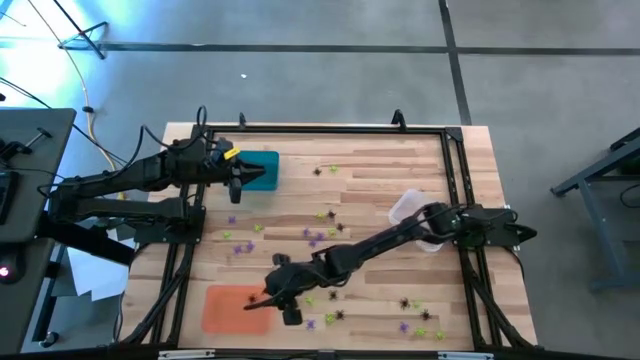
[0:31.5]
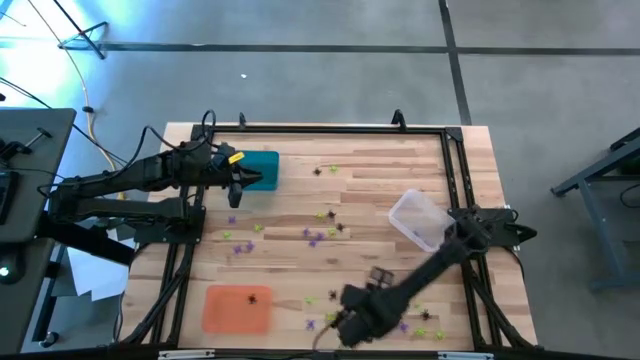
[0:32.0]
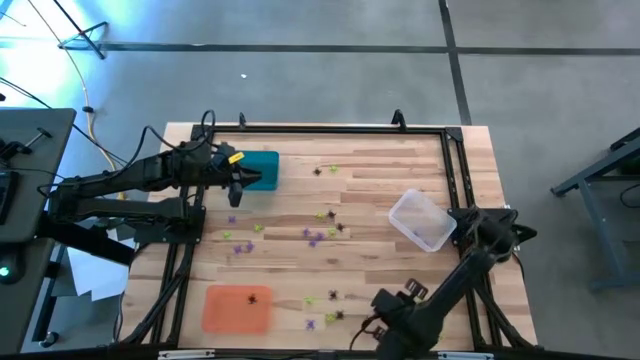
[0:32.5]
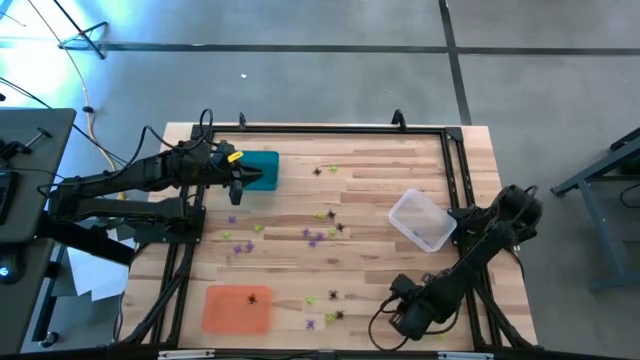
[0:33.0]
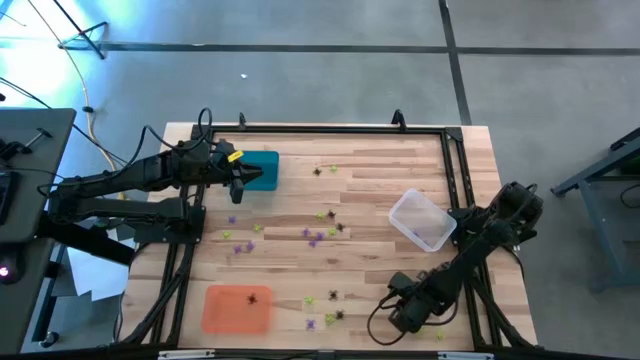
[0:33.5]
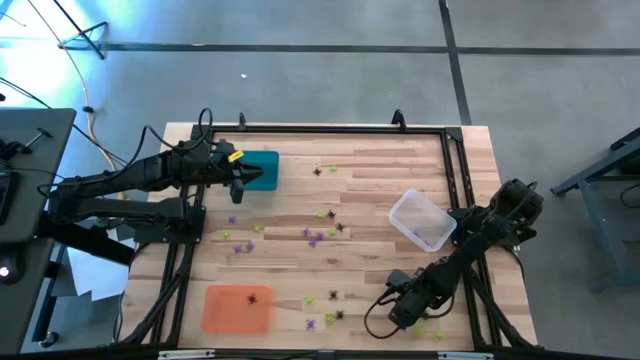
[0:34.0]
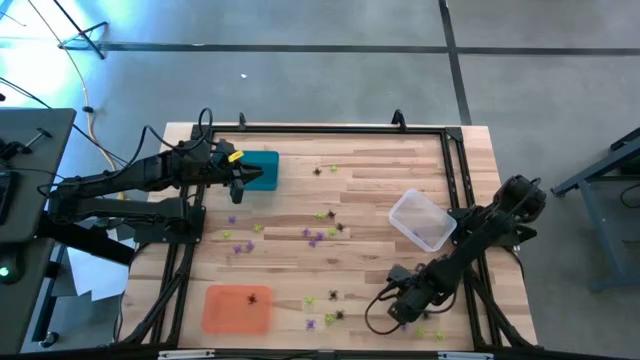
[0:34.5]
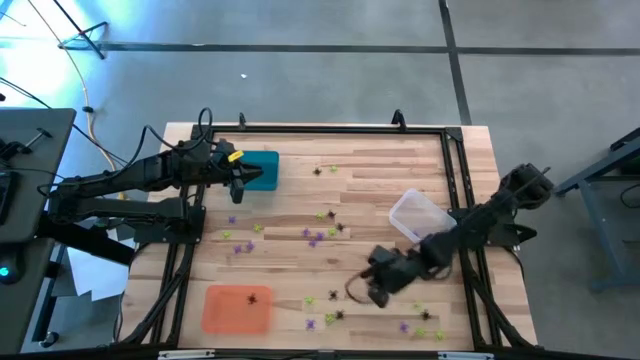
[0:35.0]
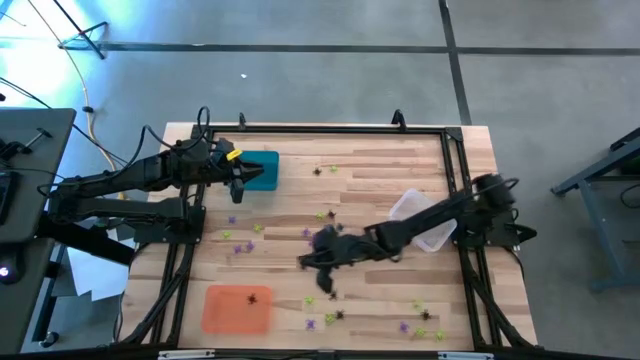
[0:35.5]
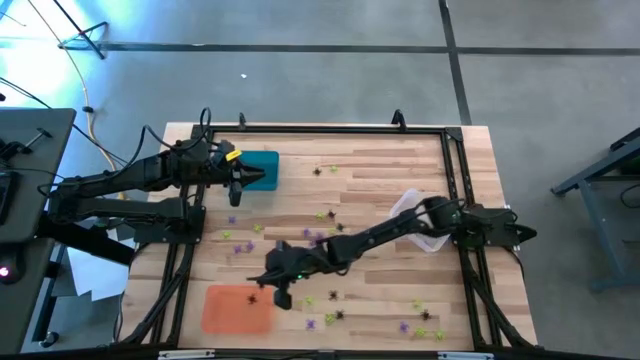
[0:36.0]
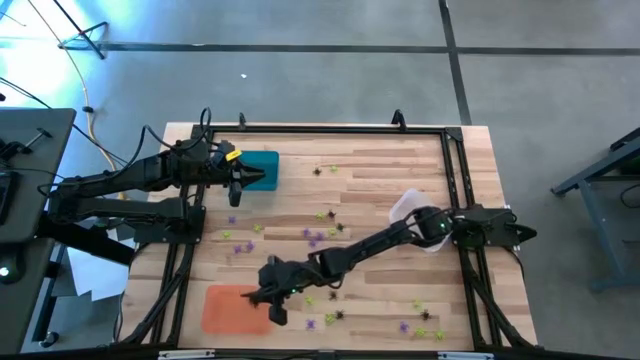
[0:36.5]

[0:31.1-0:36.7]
Task: Sort Halloween decoration
Put the black spider toy into the orange bin

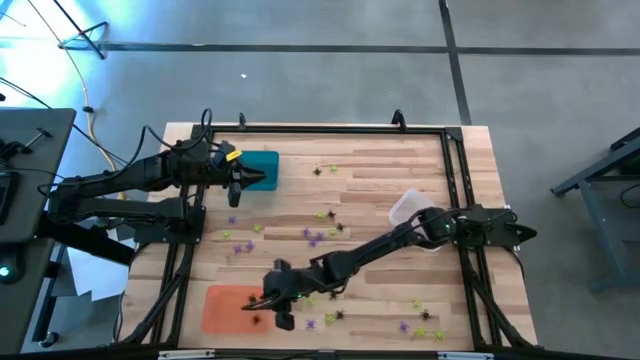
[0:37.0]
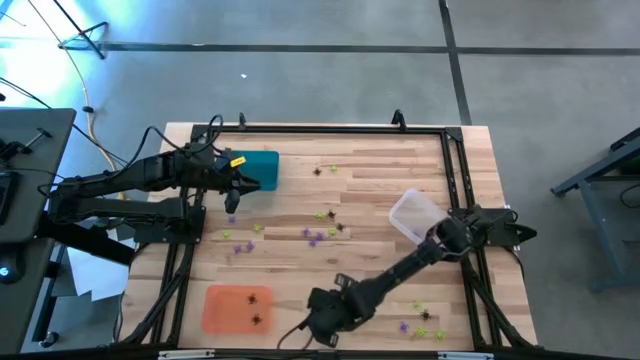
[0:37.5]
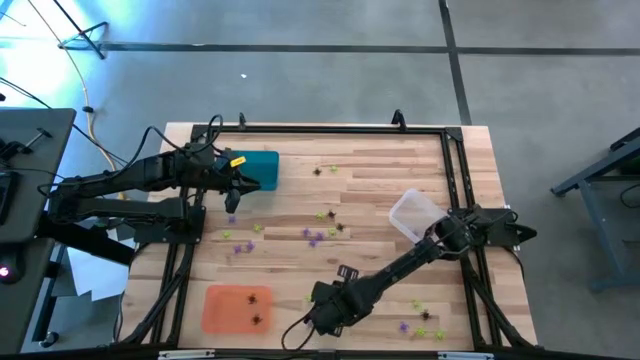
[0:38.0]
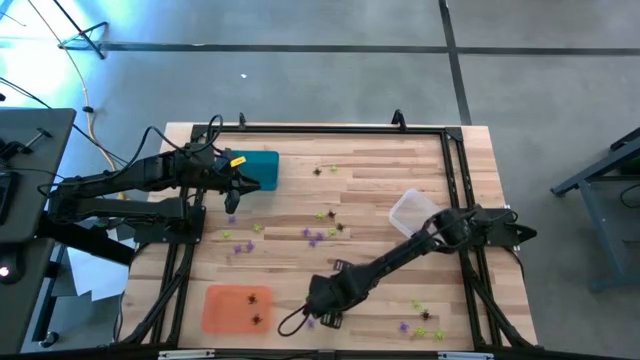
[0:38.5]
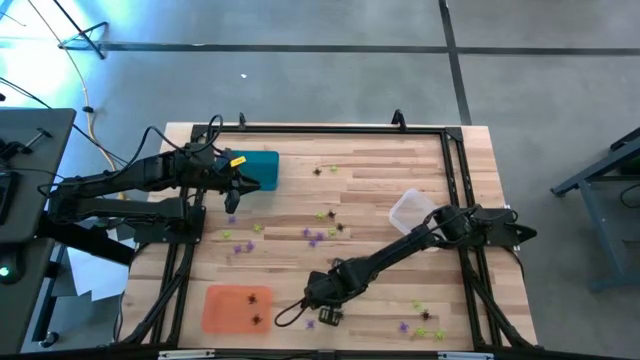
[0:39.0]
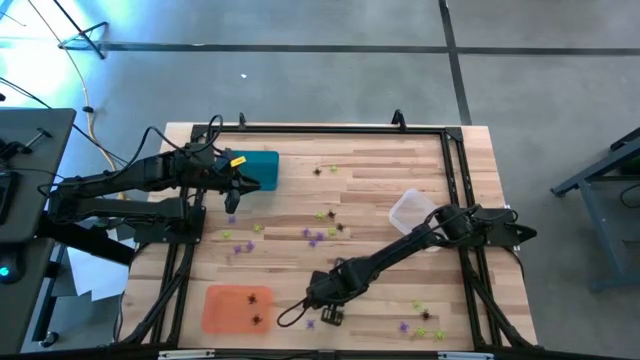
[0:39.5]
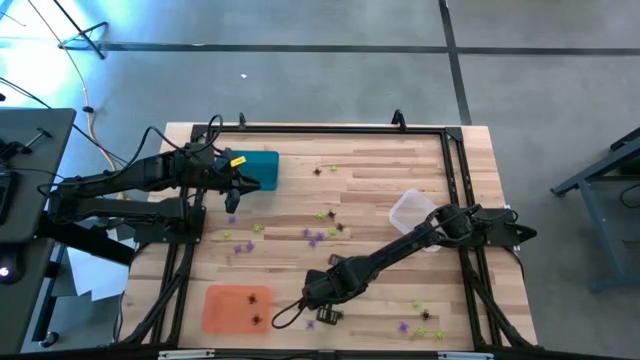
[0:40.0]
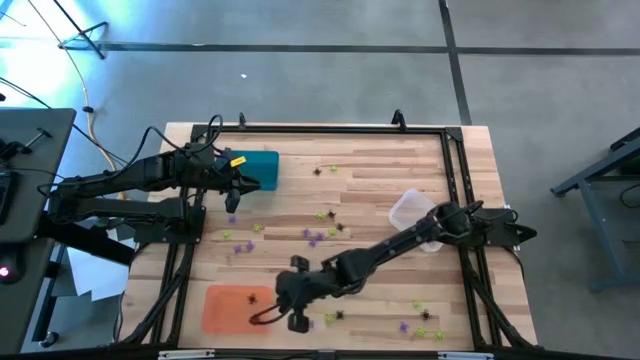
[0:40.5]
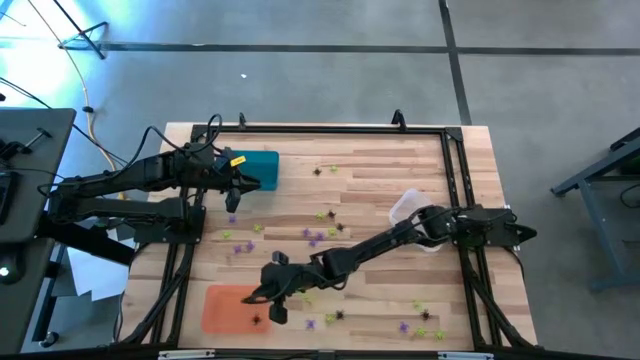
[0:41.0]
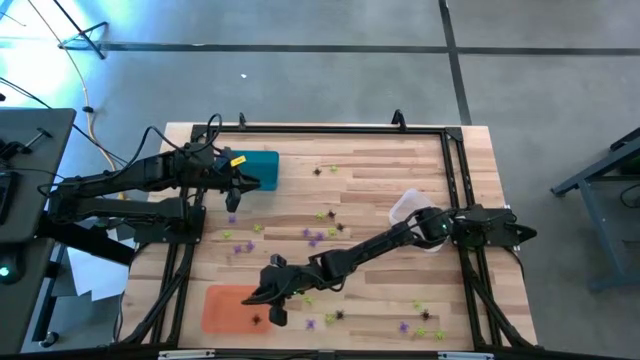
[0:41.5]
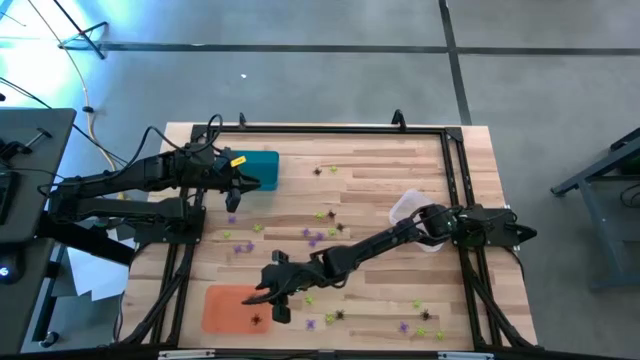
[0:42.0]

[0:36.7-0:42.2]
Put the black spider toy into the orange bin

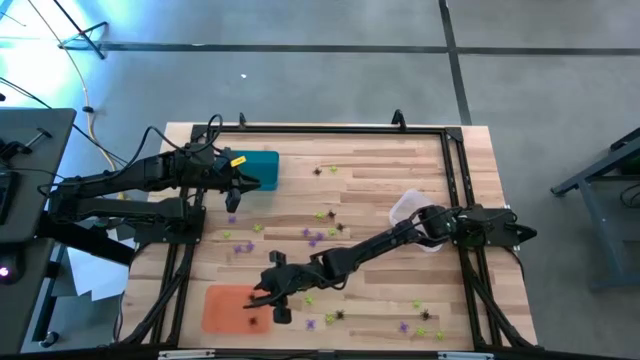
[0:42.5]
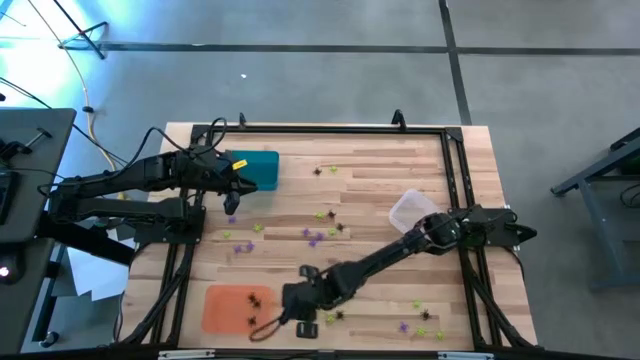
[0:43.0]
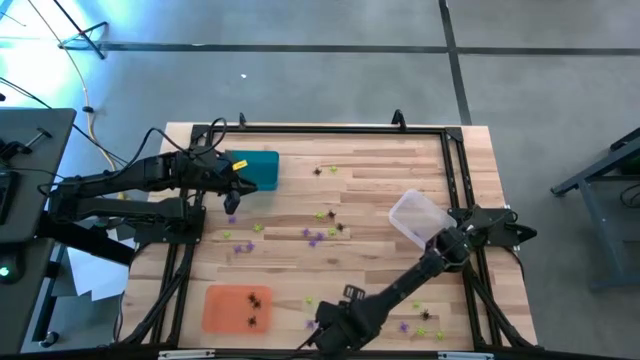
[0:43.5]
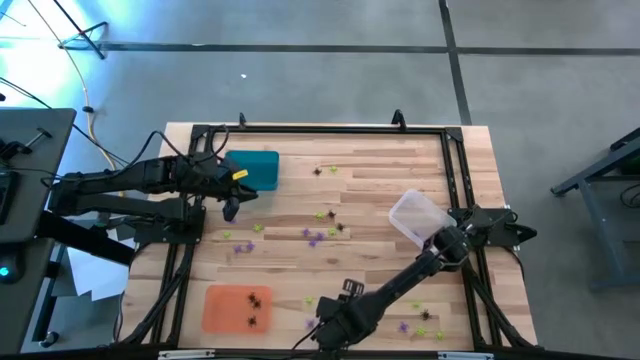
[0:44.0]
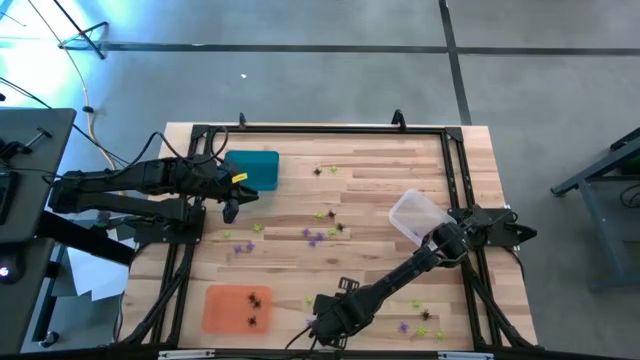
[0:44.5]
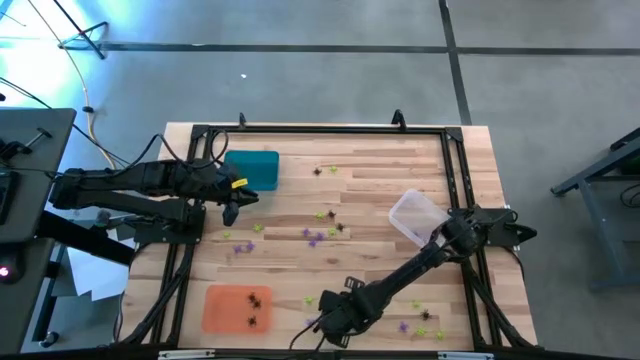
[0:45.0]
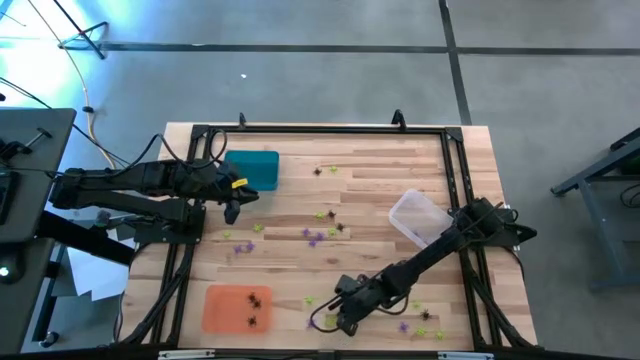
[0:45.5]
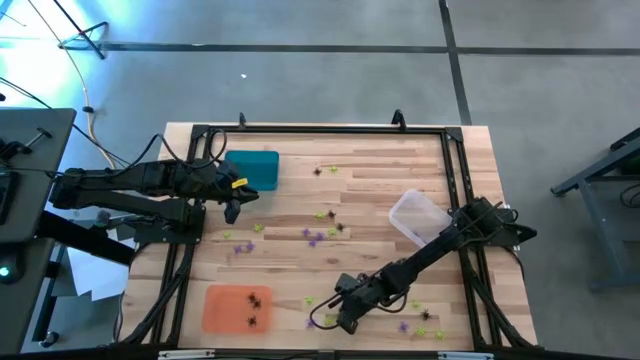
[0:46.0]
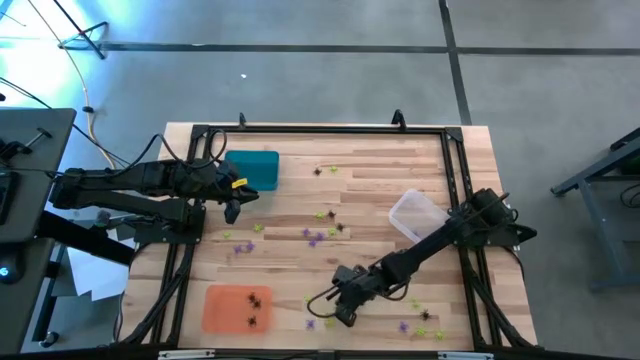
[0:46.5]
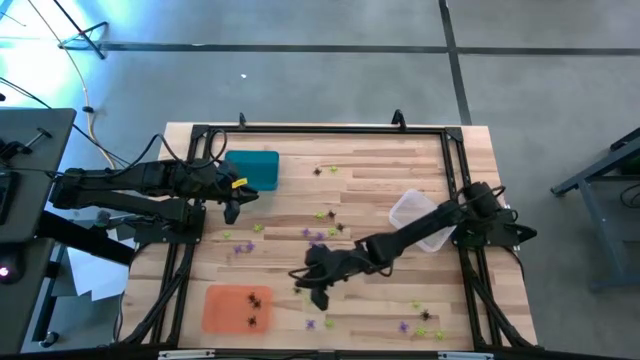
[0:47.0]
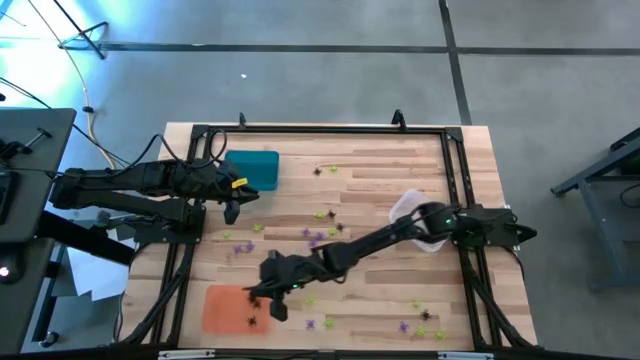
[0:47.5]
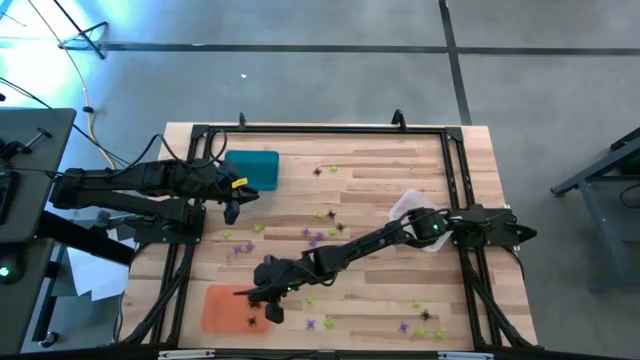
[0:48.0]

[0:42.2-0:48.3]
Put the black spider toy into the orange bin

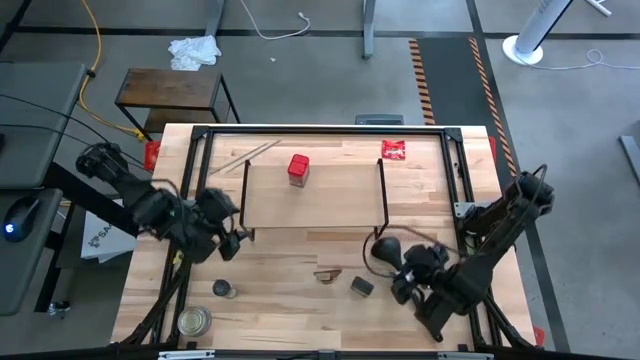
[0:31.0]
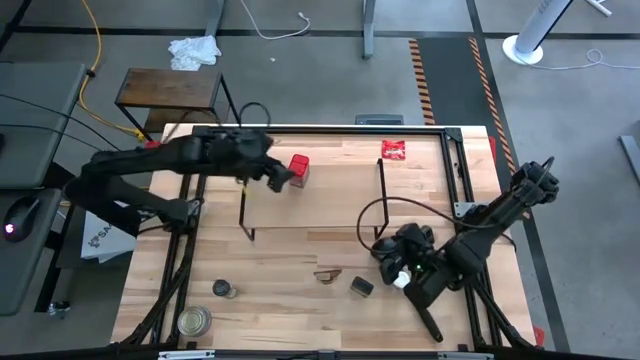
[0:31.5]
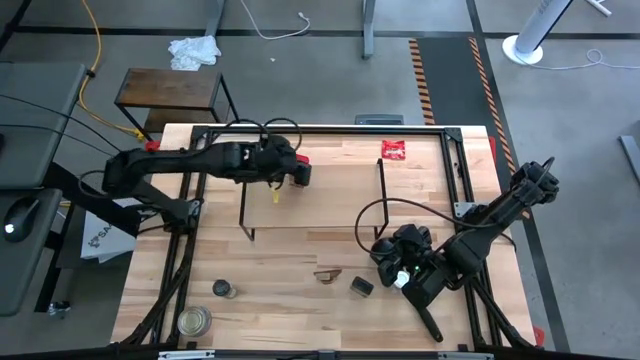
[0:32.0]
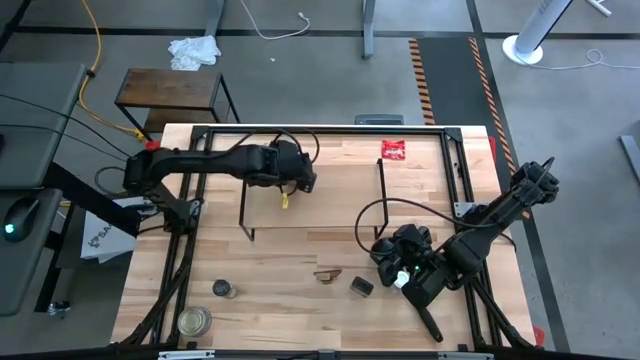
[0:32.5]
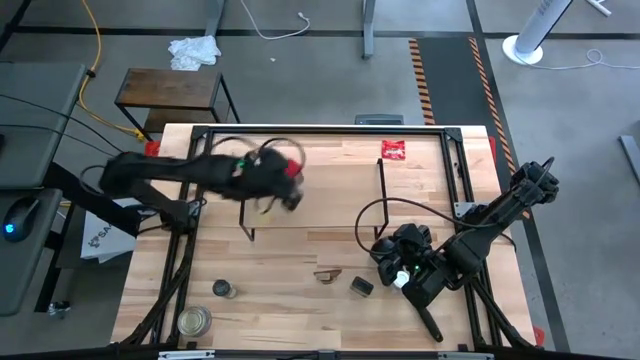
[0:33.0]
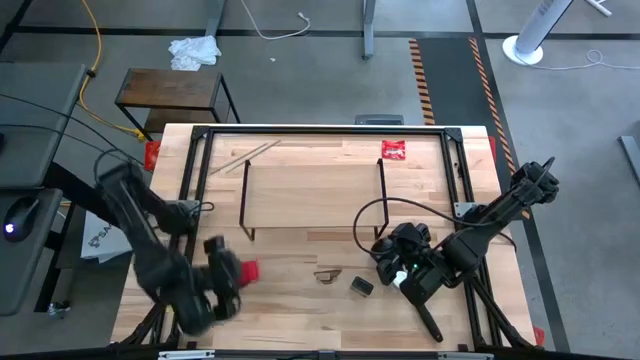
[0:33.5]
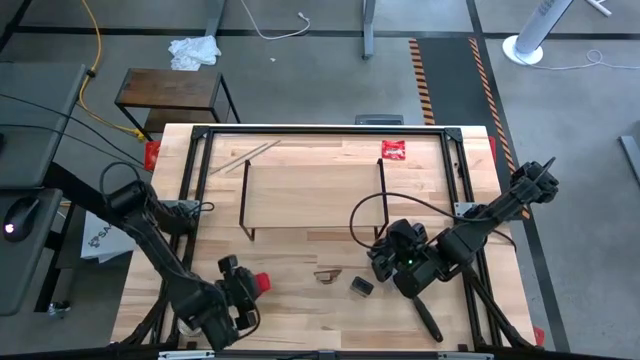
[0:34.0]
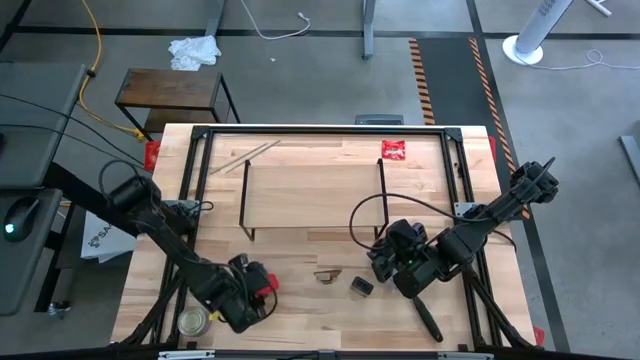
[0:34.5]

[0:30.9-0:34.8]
Task: Shelf spices
Remove the red seasoning can from the shelf

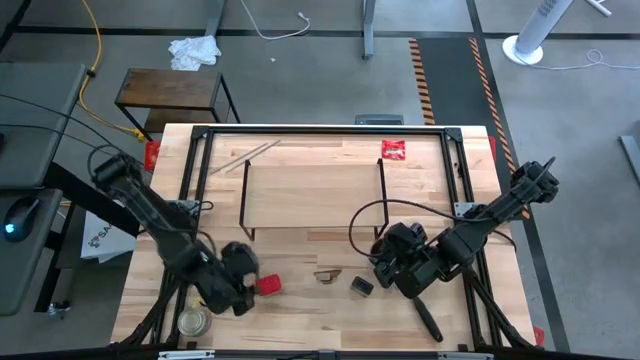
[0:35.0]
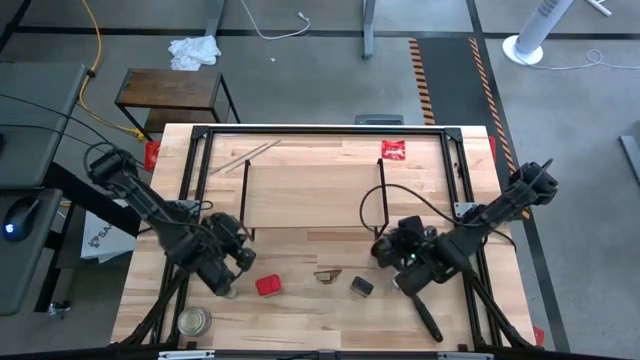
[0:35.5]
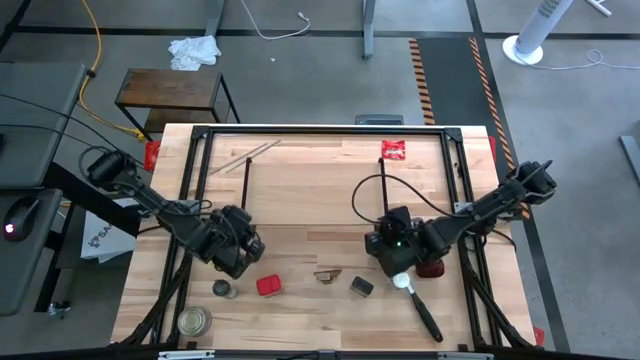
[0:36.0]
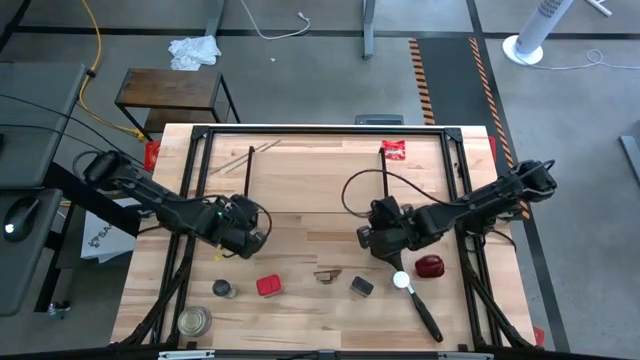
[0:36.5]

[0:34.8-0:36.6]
Adjust the shelf
